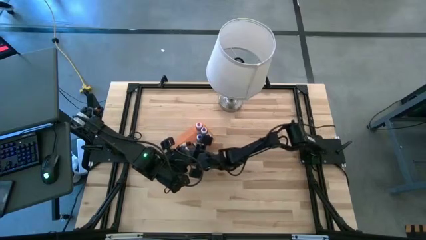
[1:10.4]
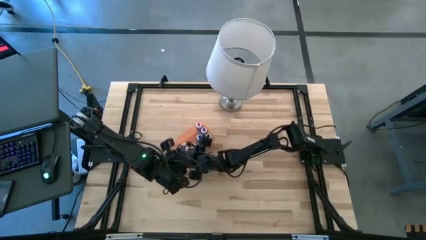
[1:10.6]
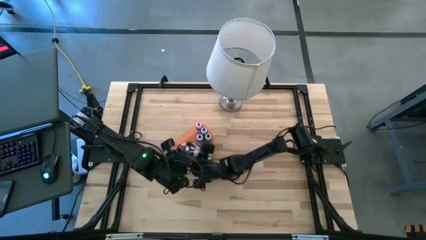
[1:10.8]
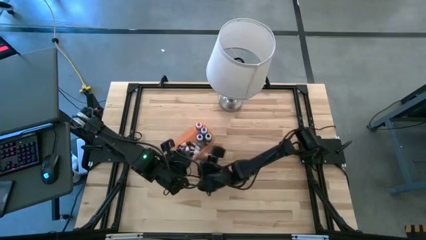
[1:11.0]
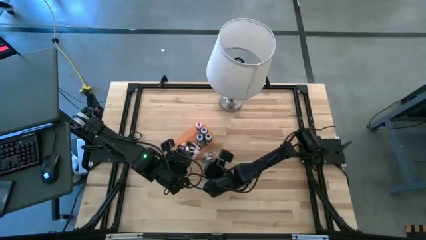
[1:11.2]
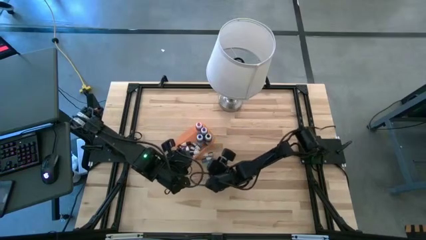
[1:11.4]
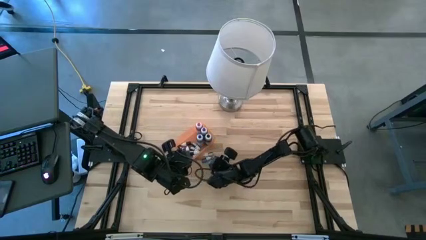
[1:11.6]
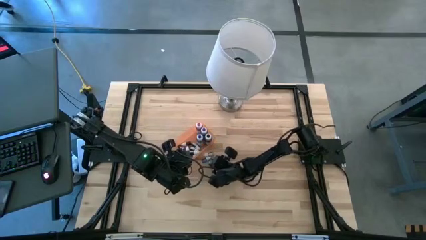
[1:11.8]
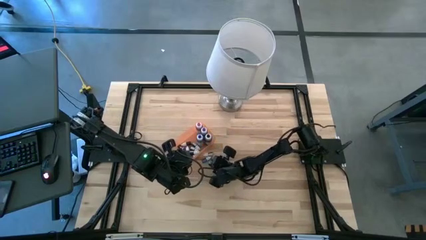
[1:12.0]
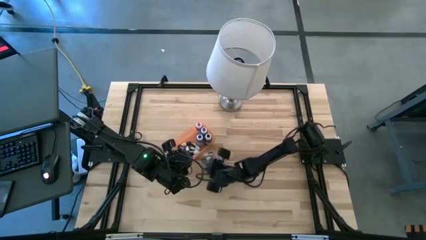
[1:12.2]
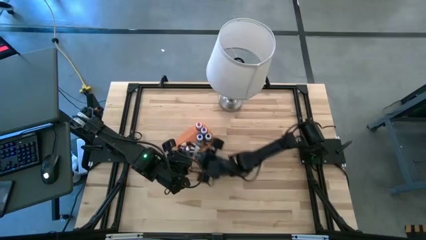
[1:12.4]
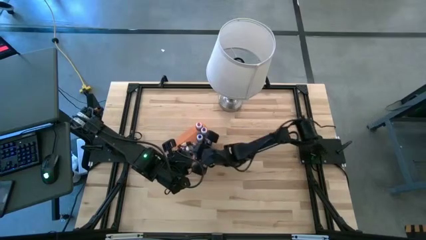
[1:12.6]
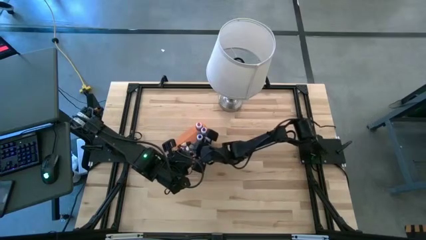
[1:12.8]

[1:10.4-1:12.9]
Task: Pick & Place food coloring
Put the bottom small green food coloring bottle into the bin

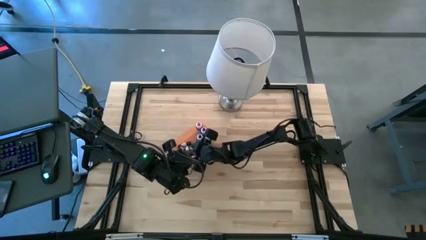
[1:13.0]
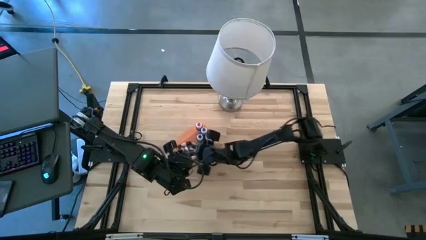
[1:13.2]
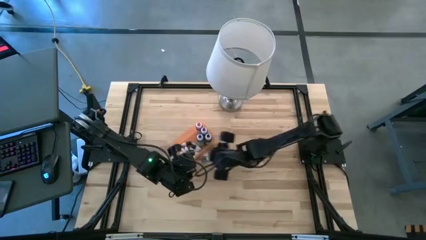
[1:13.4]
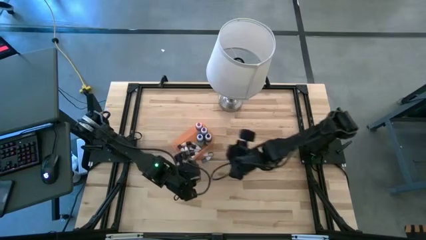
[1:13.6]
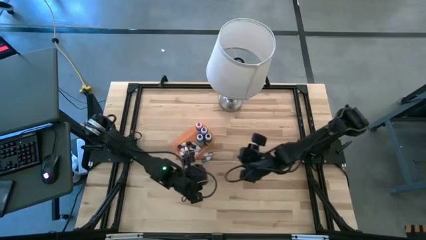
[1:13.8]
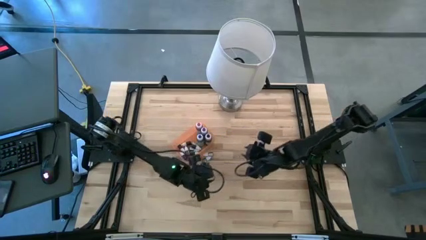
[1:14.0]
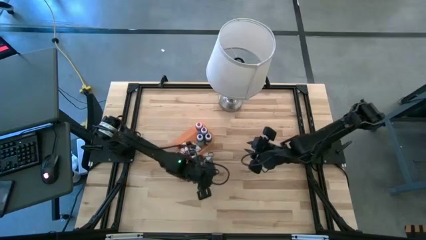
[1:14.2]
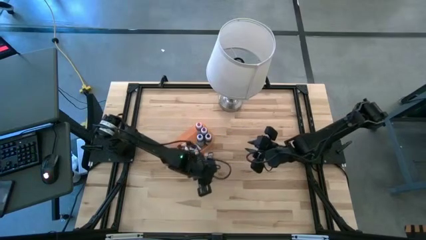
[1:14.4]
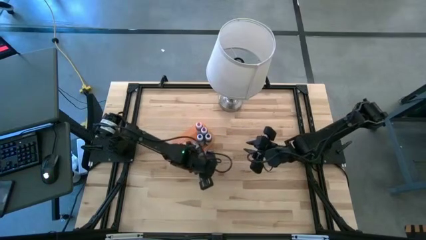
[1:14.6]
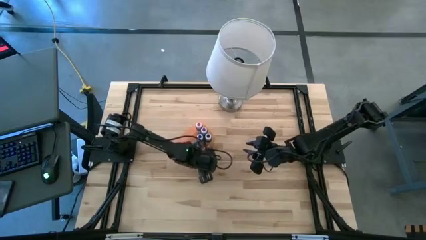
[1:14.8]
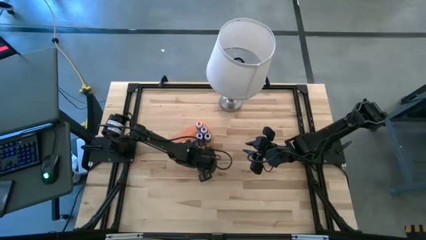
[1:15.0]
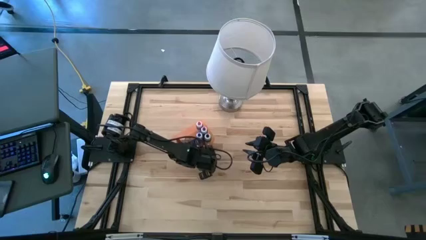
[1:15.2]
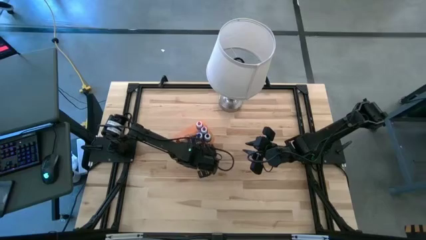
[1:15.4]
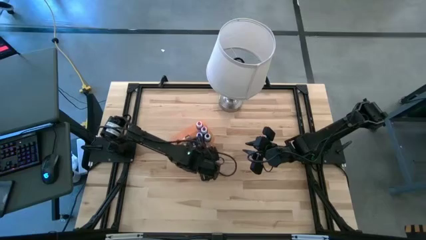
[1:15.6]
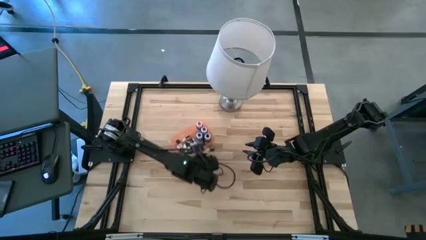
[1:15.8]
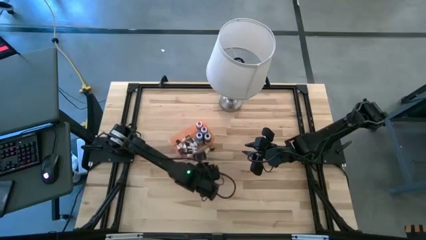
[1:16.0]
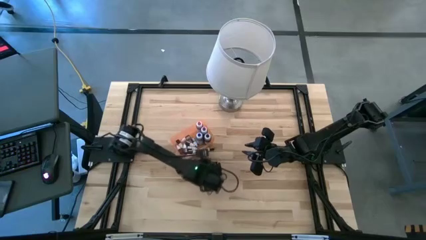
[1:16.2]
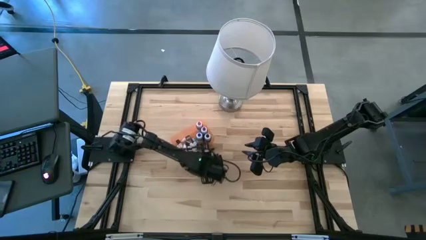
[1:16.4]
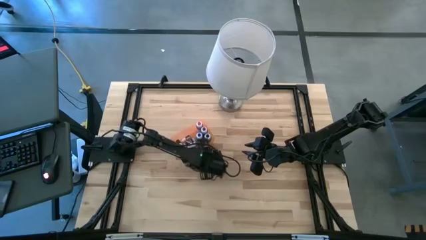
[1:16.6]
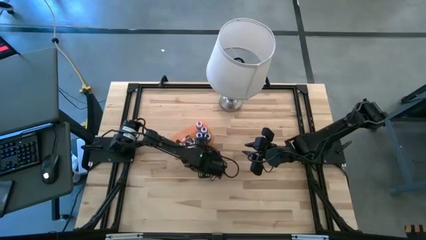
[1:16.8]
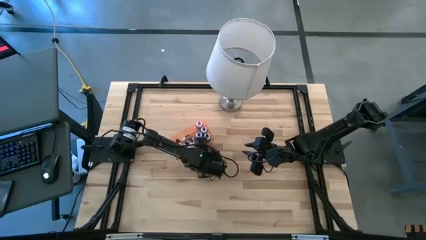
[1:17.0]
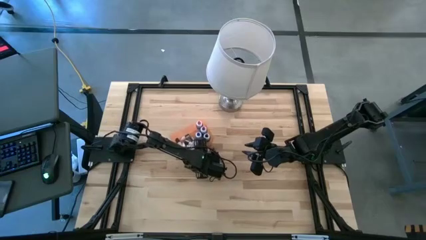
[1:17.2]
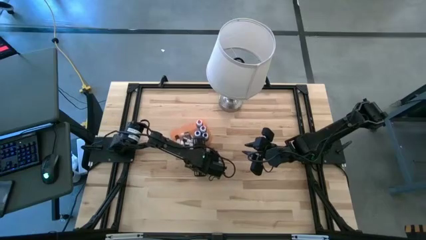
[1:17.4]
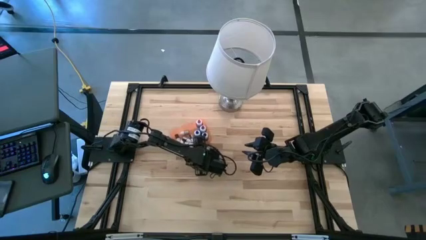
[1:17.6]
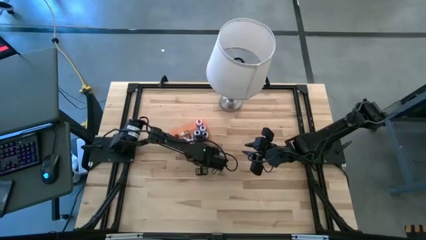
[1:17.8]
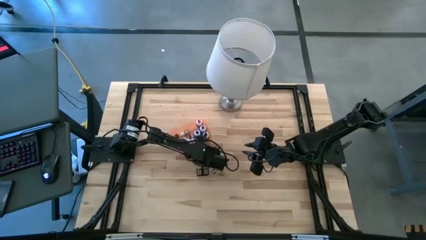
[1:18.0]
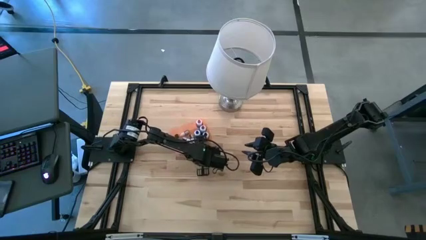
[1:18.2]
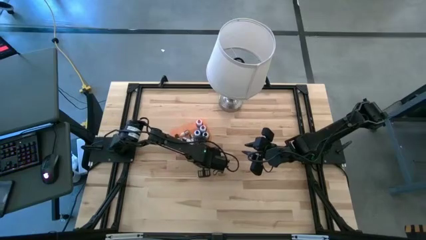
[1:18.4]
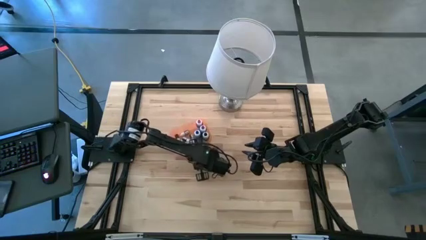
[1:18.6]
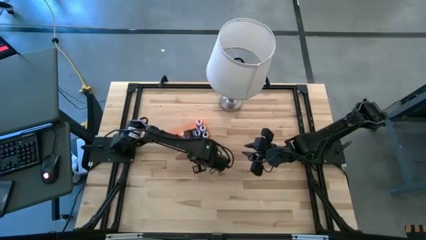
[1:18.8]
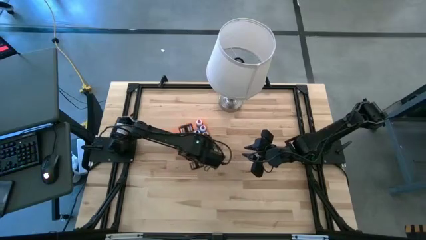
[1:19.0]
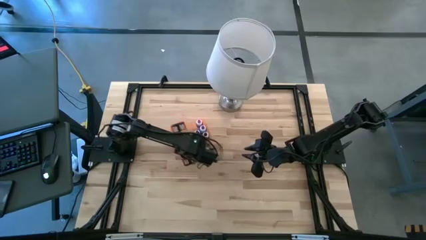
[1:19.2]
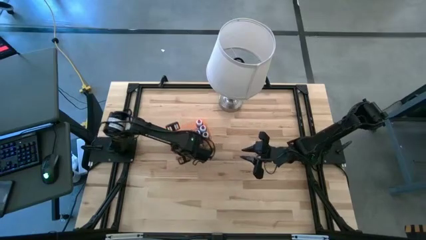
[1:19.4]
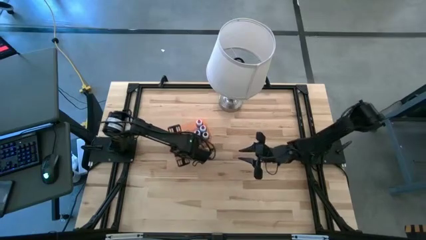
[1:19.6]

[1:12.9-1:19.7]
Put the small blue food coloring bottle into the bin

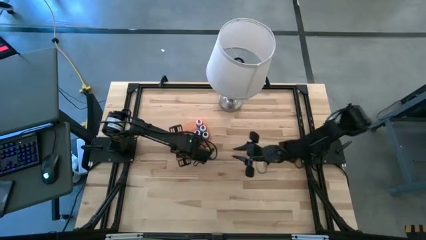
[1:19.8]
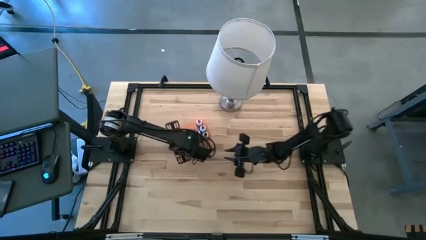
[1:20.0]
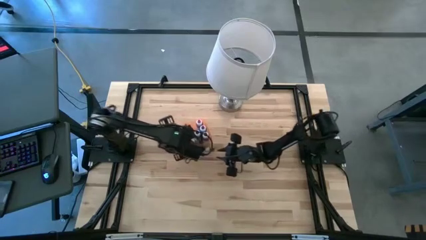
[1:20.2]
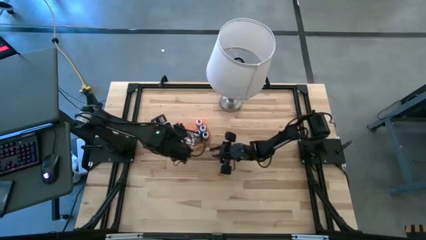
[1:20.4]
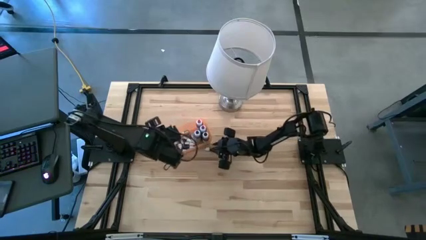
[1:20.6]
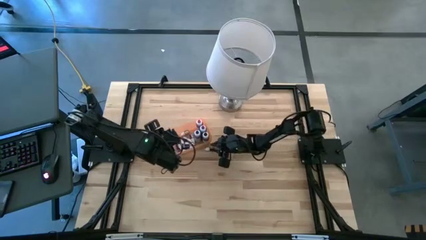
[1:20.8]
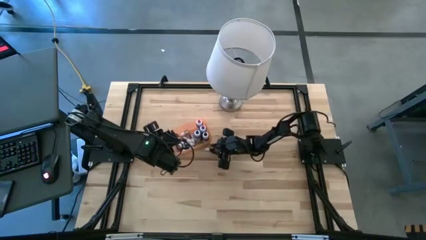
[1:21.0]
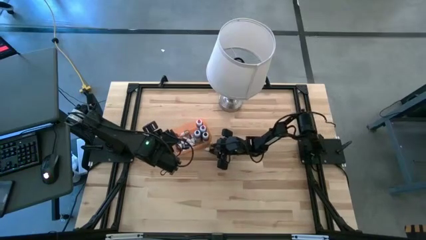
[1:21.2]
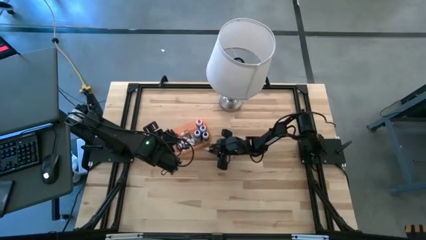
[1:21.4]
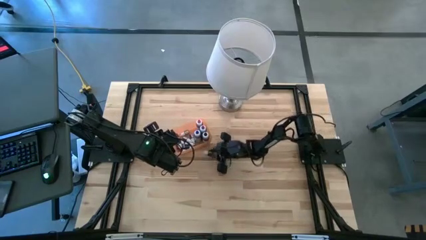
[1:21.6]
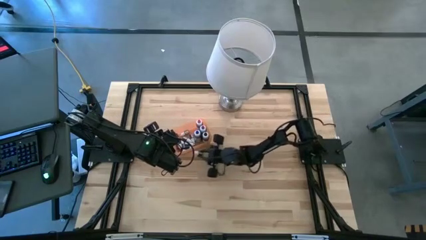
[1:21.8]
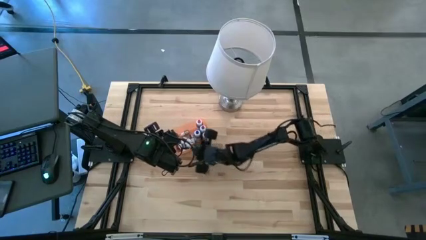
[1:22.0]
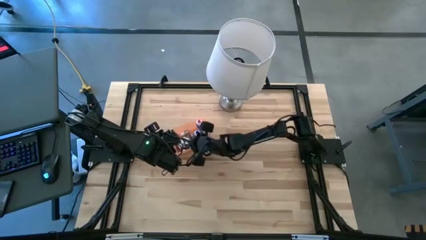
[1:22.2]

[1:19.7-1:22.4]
Put the small green food coloring bottle into the bin

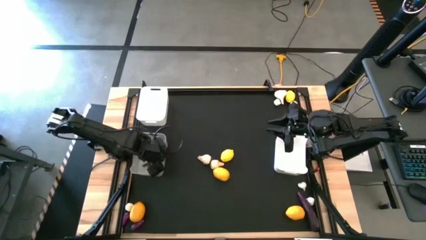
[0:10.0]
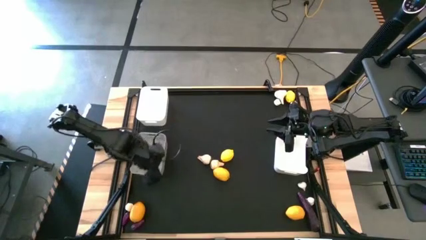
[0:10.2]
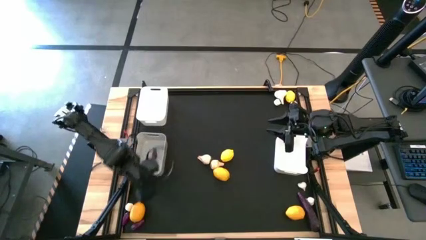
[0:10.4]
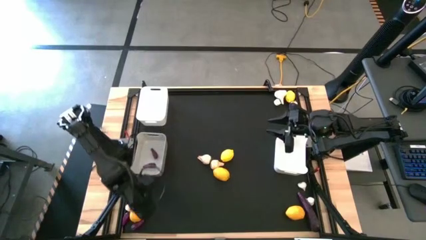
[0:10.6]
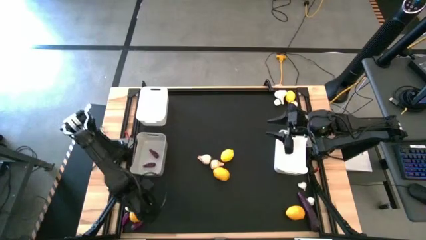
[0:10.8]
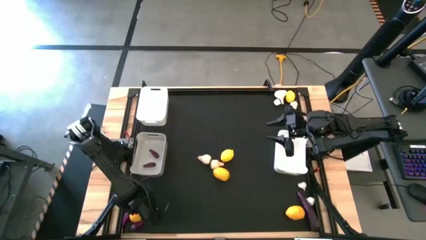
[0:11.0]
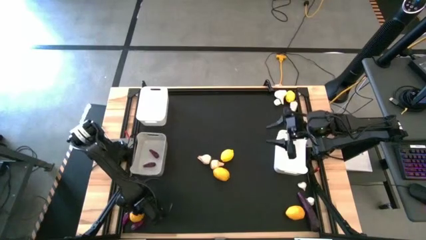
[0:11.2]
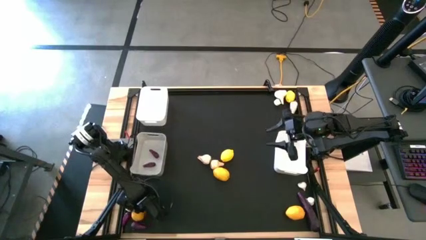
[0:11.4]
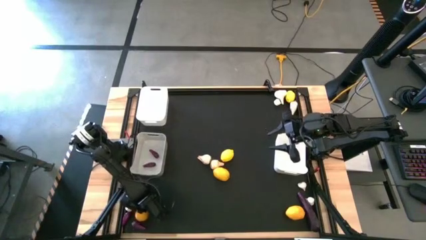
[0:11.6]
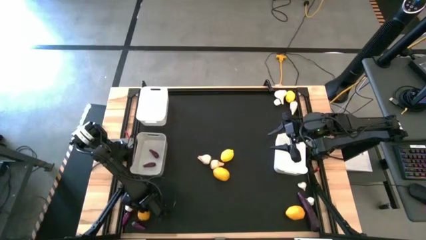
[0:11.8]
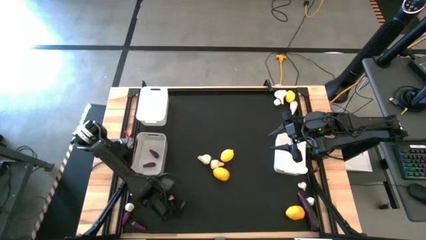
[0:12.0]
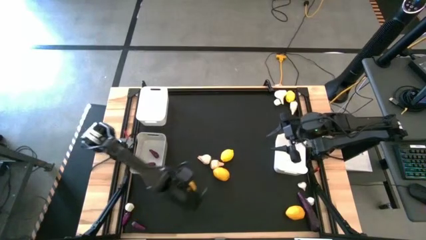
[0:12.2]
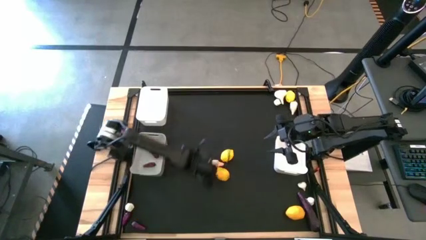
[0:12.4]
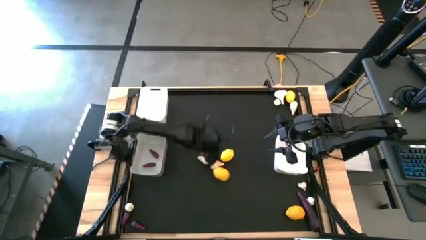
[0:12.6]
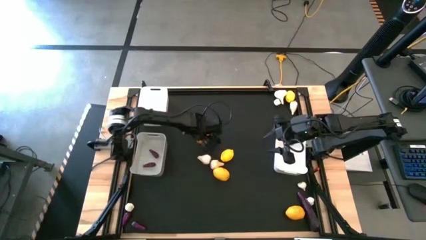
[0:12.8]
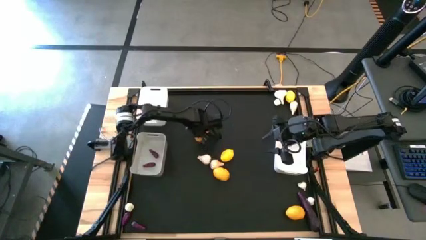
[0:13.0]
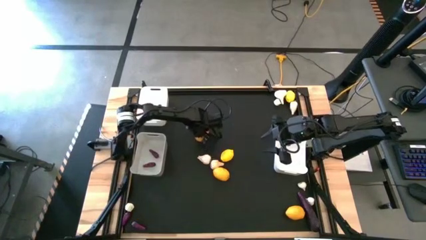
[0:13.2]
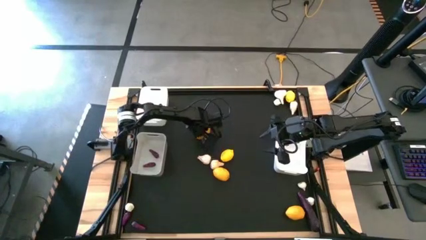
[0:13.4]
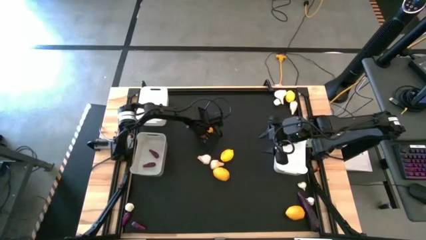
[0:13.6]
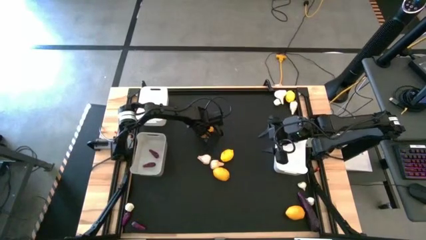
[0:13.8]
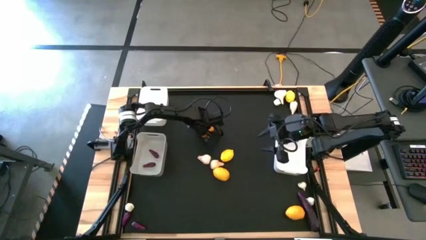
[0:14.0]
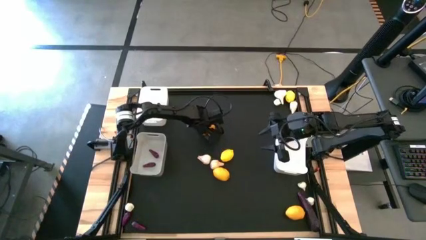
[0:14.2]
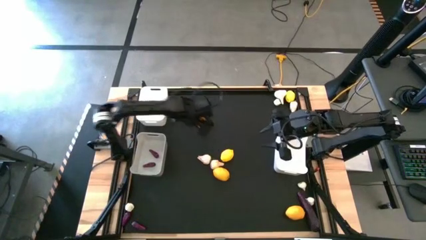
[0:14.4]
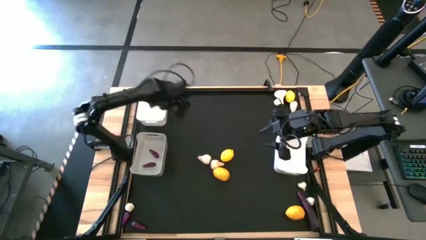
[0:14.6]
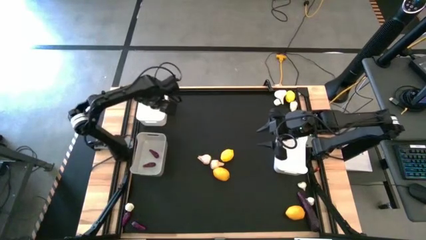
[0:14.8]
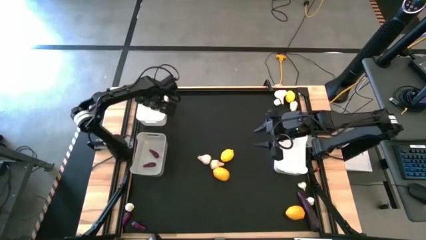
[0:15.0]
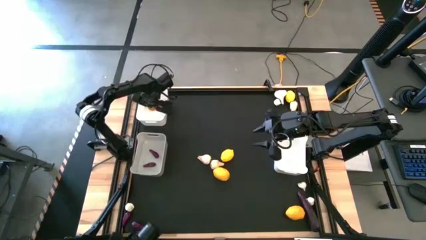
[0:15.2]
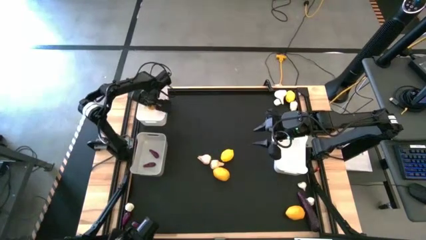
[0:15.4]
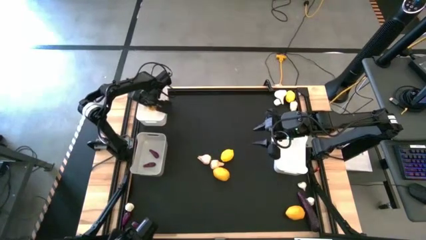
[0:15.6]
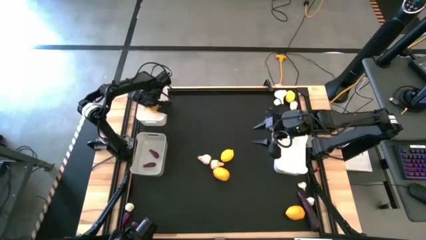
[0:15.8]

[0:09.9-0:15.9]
Task: Sort produce into baskets
Put the yellow lemon into the top white bin
